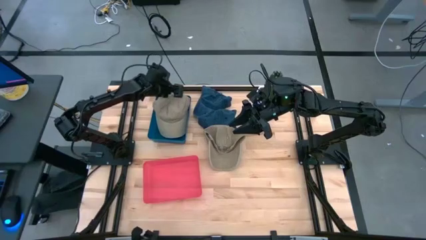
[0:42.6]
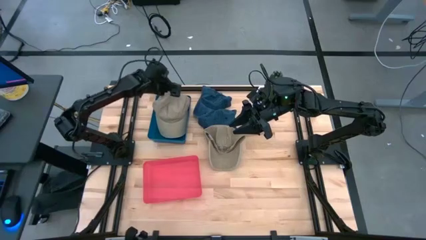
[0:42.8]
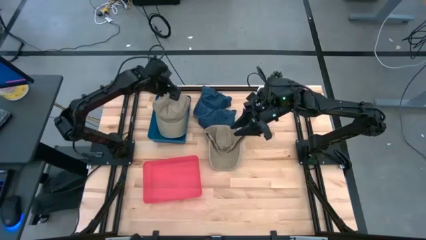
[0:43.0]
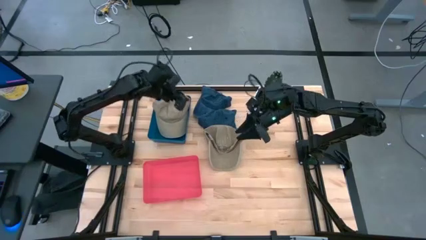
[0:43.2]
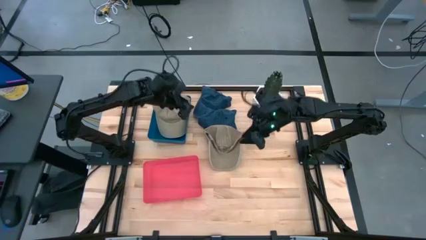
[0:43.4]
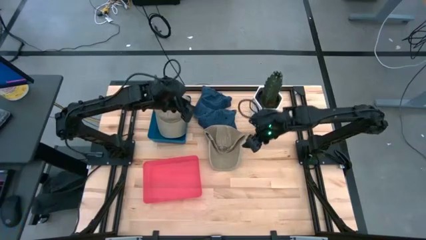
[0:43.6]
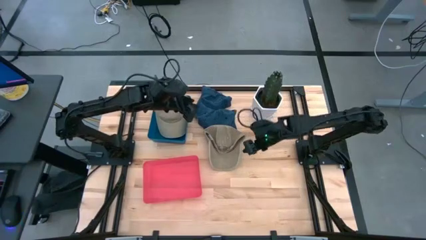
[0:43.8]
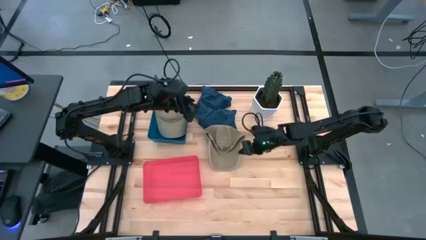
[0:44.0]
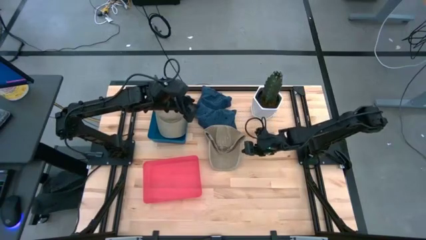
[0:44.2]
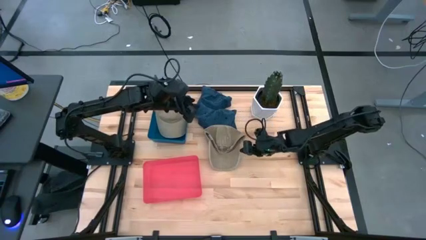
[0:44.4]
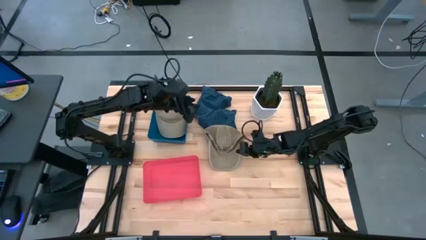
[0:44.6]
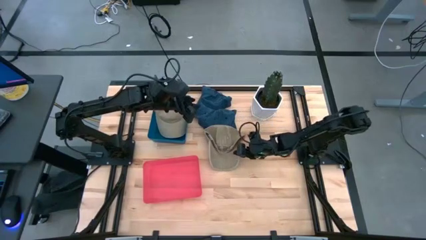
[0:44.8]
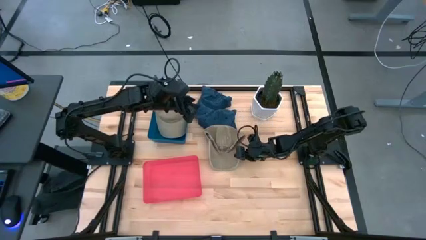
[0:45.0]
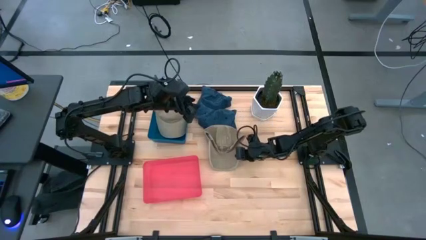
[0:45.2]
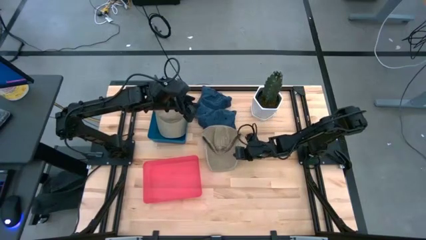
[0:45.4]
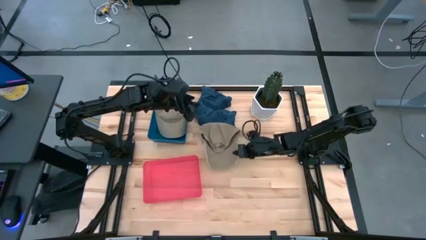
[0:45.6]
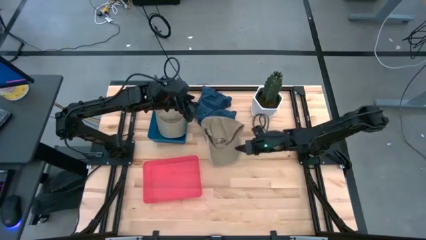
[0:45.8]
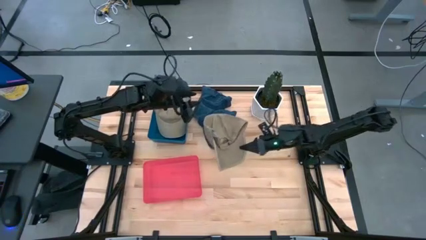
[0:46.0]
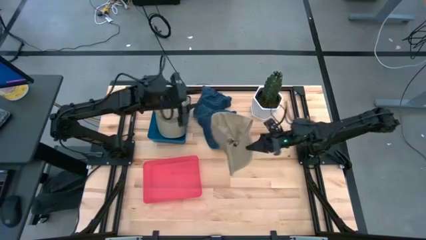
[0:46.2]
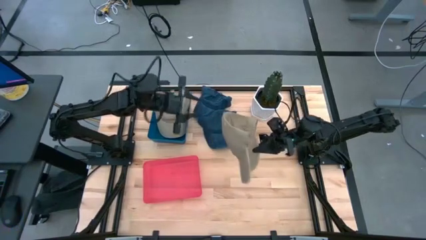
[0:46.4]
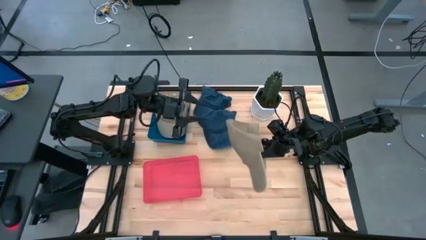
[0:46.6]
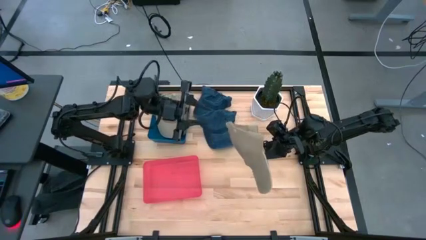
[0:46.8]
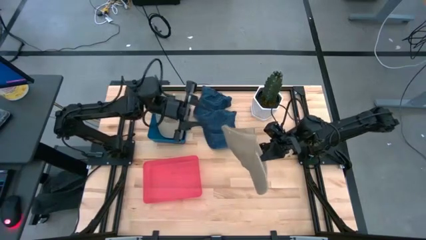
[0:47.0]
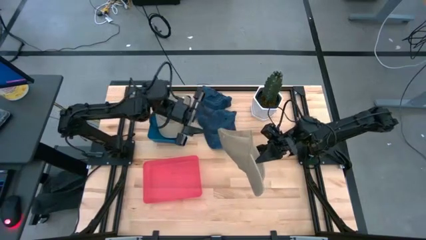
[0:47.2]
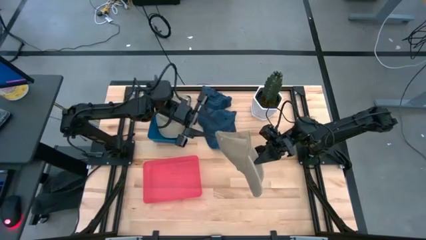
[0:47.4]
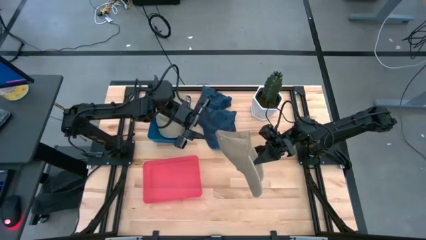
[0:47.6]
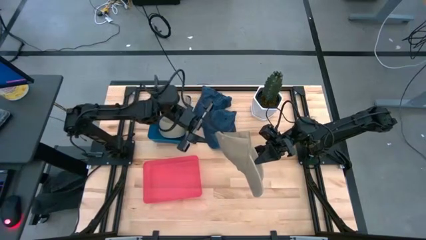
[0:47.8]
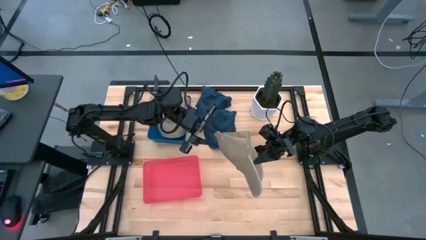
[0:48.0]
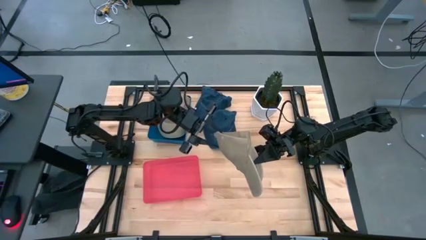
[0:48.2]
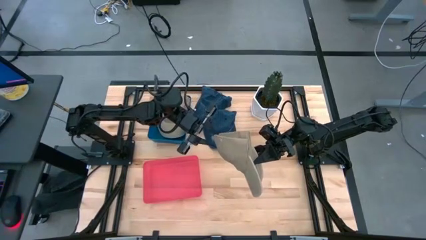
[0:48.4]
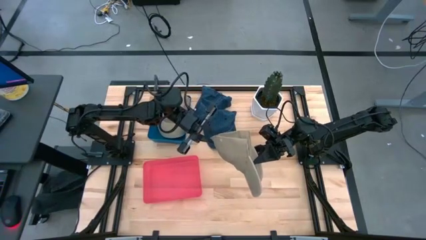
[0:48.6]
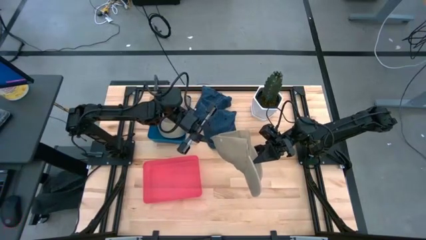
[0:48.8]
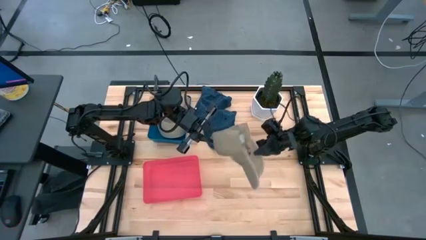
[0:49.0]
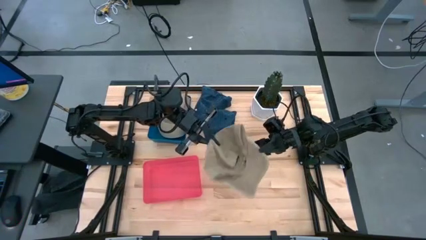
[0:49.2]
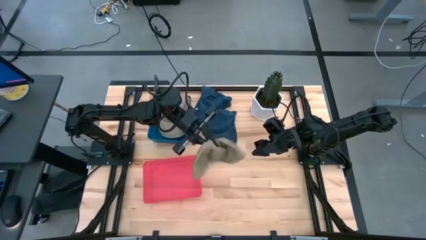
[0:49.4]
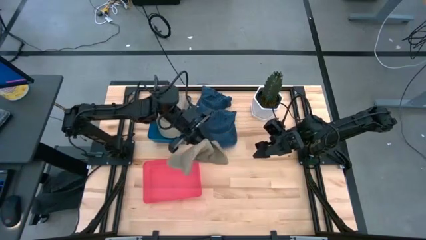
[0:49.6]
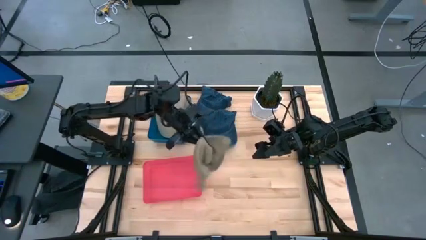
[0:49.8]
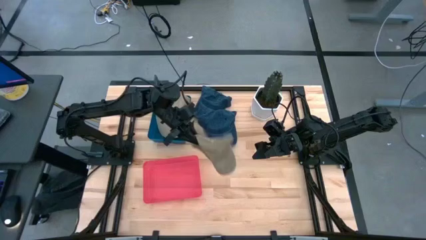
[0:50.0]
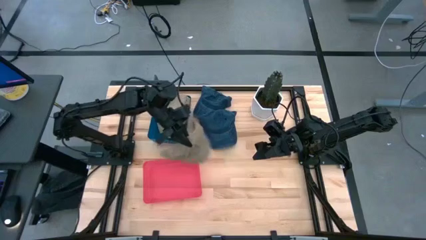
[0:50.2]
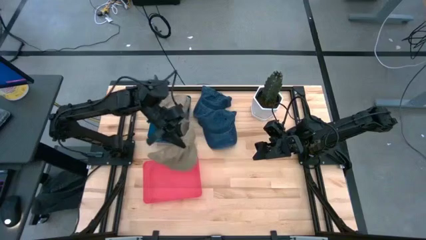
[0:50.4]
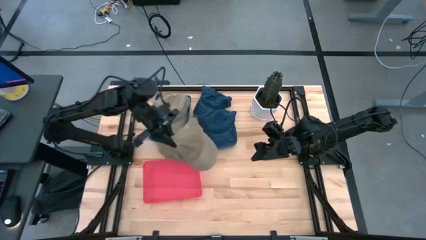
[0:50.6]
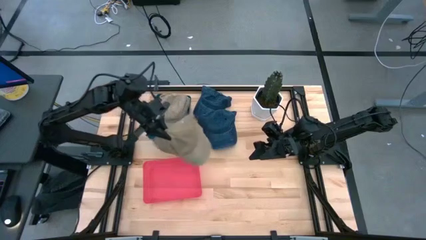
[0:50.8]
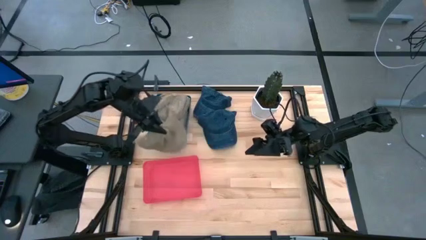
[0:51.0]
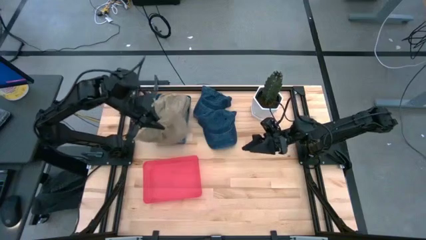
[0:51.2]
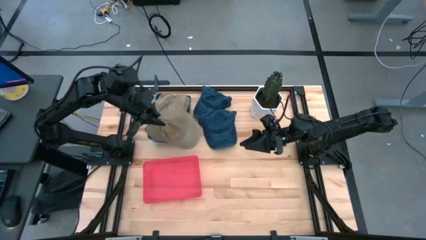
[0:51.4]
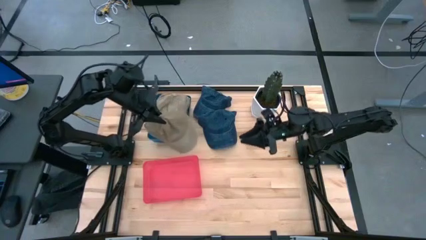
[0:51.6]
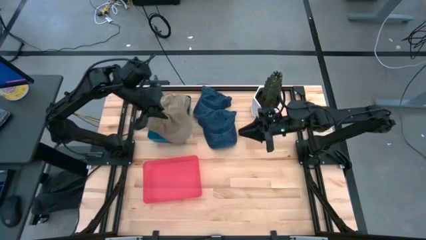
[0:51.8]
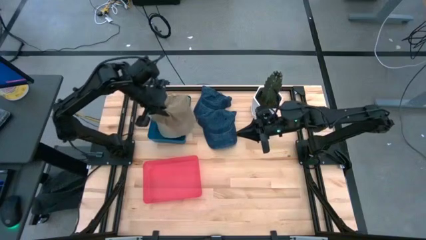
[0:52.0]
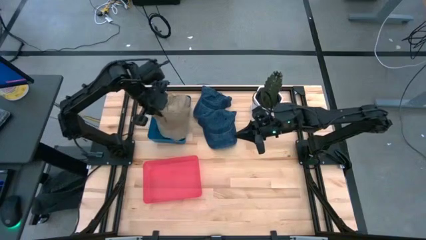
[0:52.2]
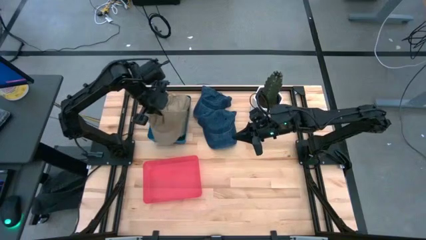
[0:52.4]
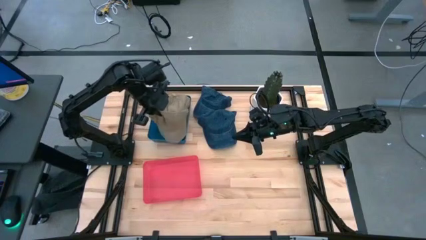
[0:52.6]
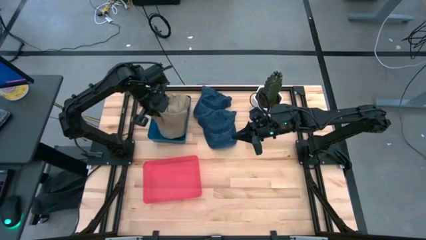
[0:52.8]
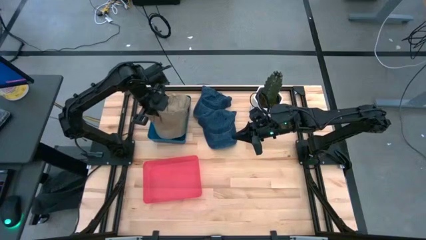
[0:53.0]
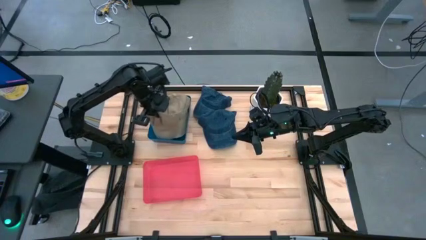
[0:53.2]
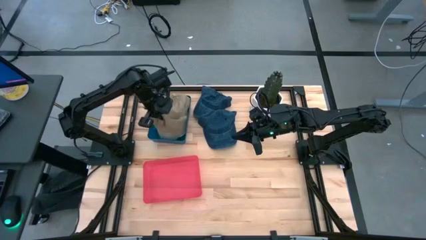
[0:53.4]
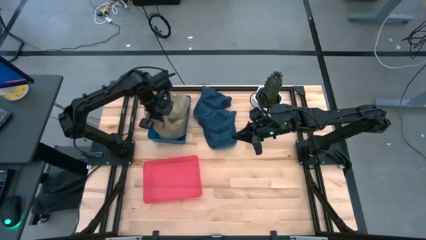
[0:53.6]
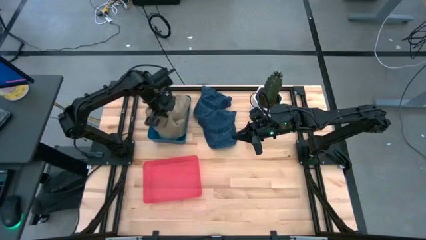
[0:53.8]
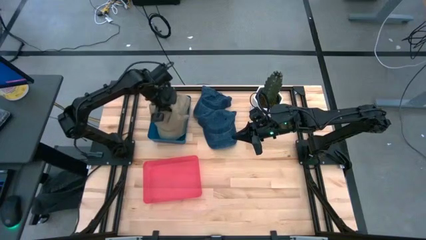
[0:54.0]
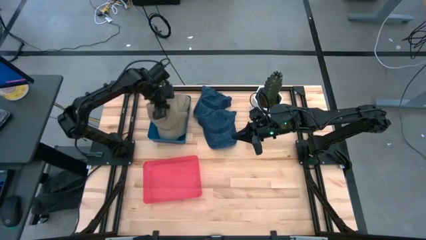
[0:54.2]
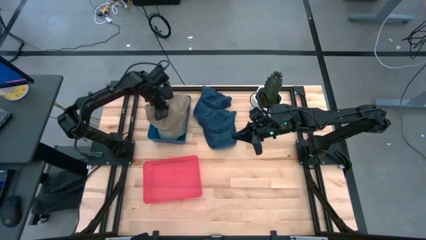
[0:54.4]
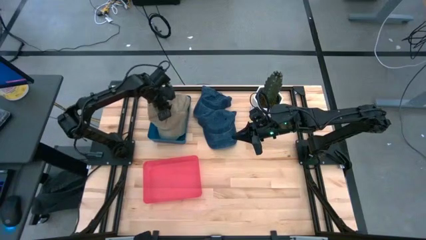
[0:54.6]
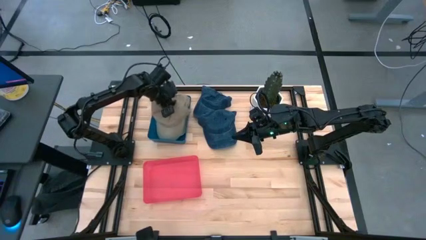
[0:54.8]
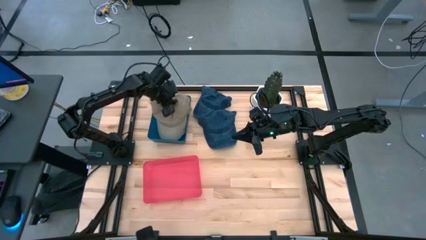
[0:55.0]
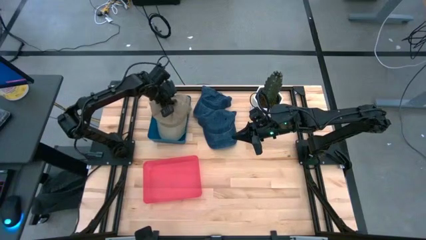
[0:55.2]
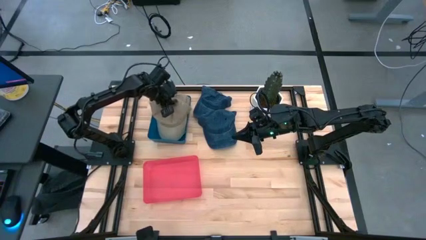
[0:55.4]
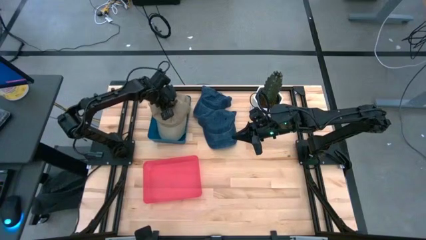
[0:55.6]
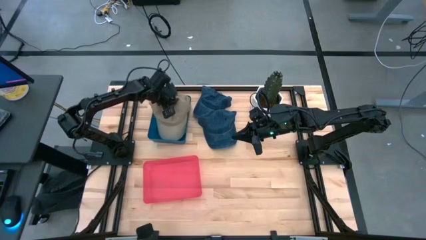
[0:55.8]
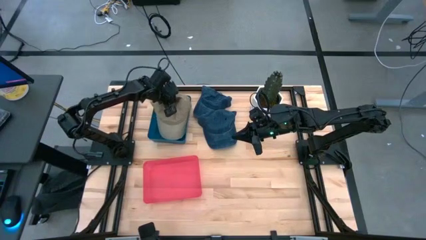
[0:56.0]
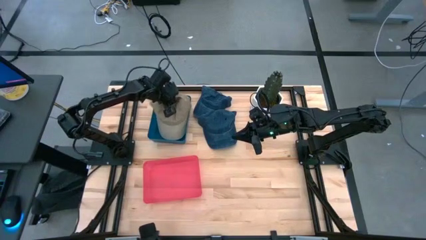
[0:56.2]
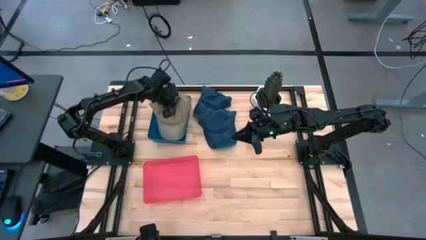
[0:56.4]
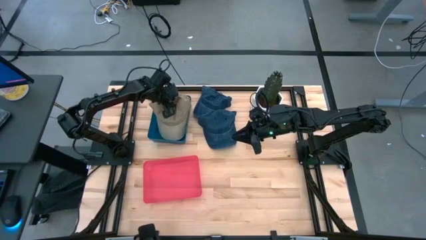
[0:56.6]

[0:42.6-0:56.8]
Task: Pick & Place hat
Put the brown cap into the blue bin
